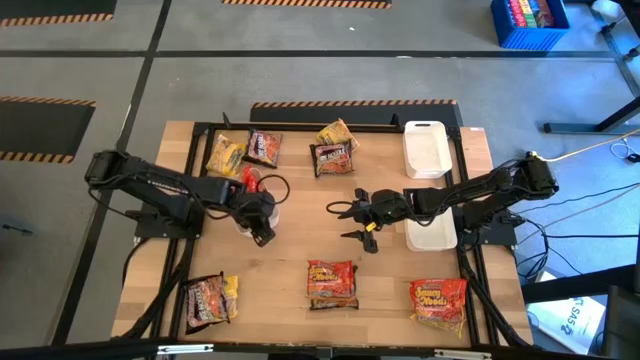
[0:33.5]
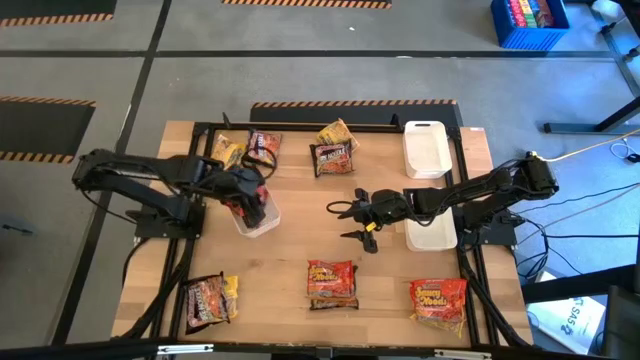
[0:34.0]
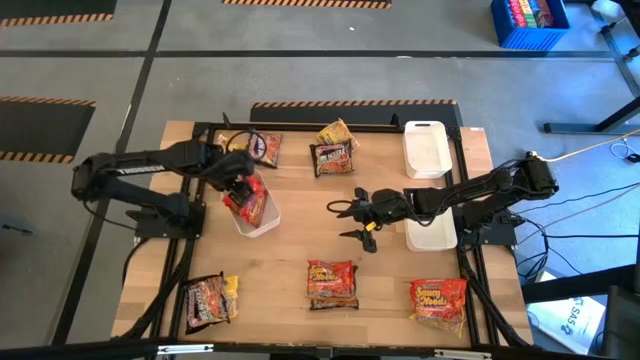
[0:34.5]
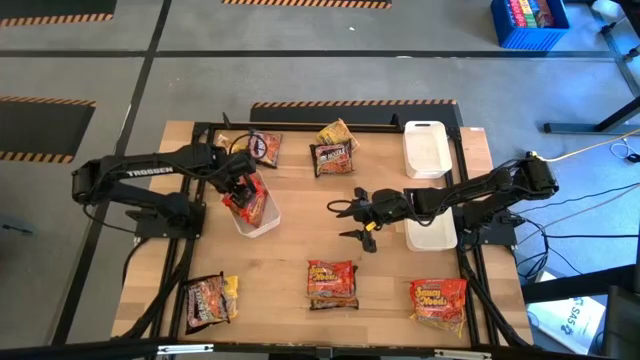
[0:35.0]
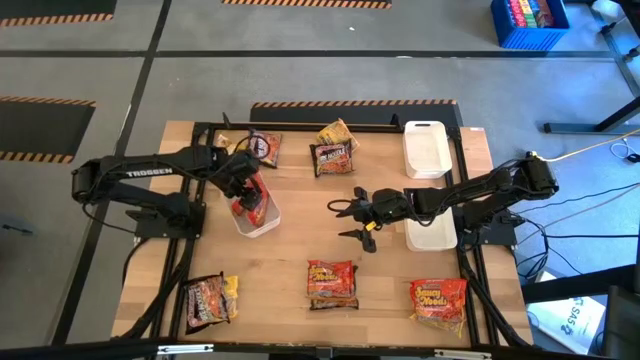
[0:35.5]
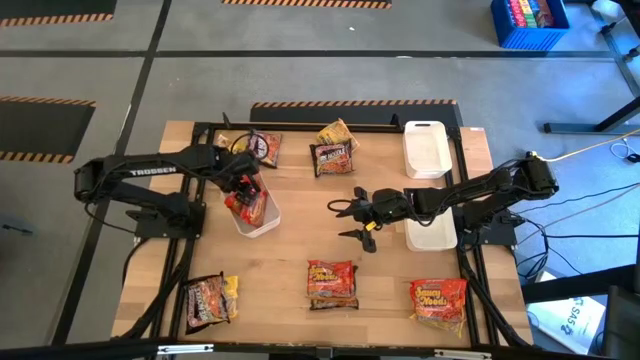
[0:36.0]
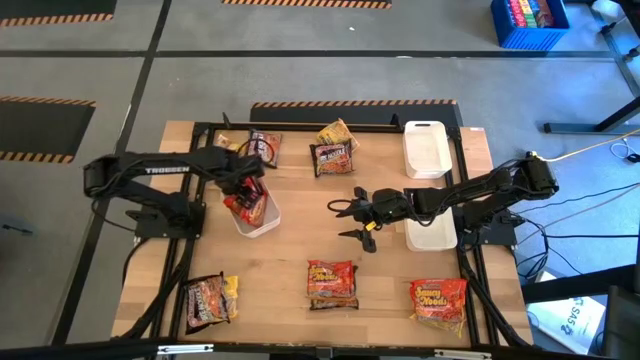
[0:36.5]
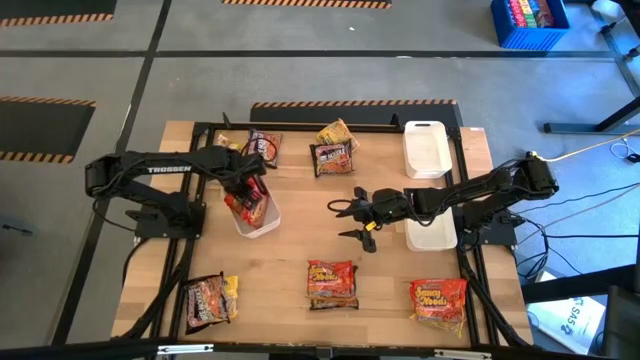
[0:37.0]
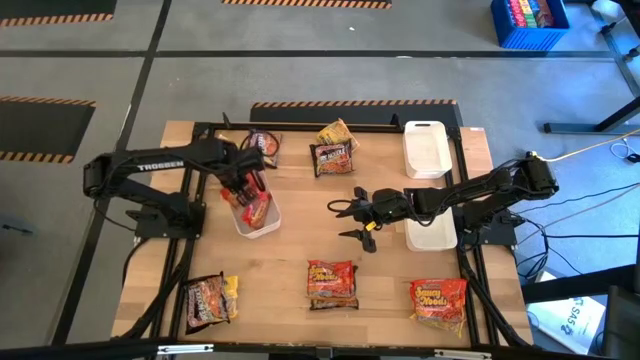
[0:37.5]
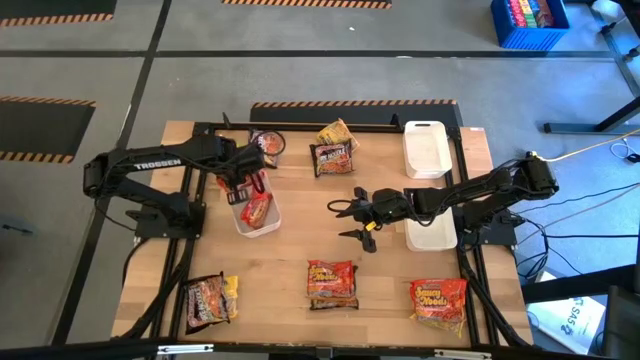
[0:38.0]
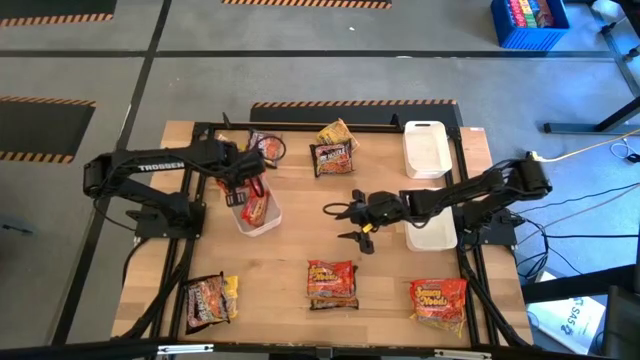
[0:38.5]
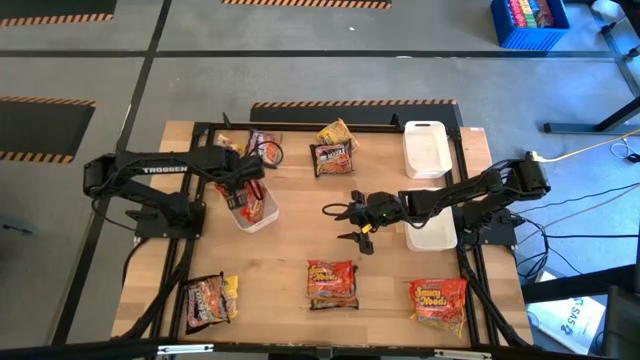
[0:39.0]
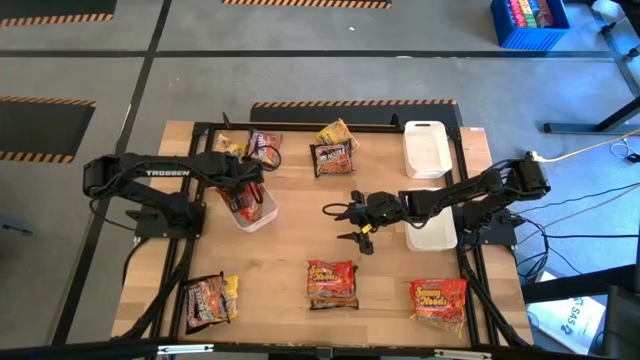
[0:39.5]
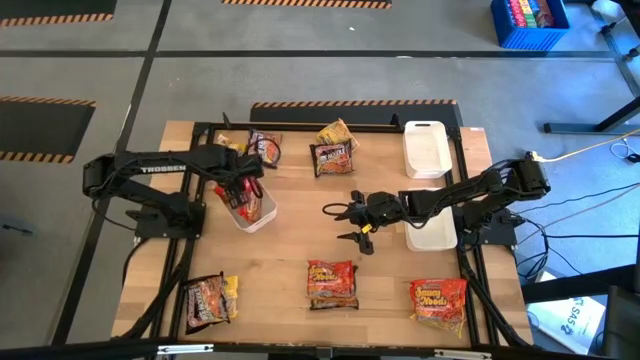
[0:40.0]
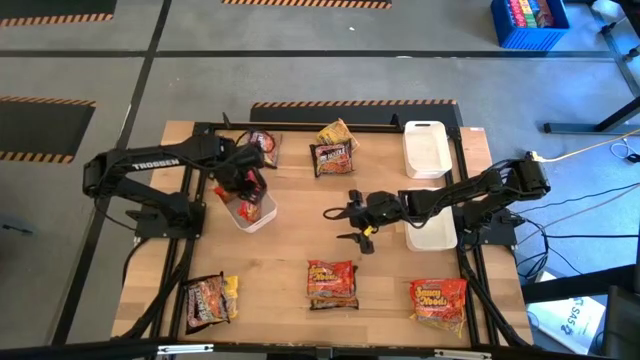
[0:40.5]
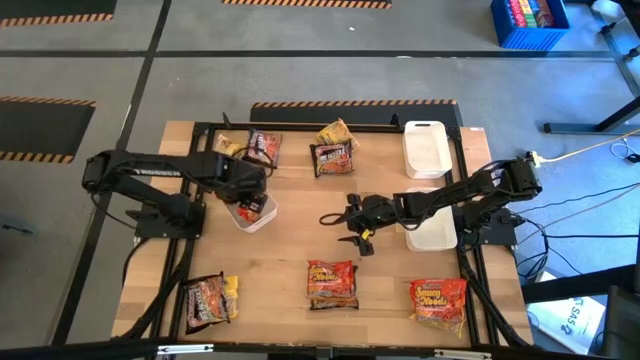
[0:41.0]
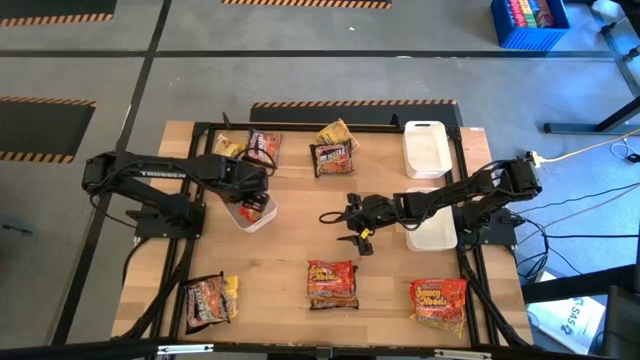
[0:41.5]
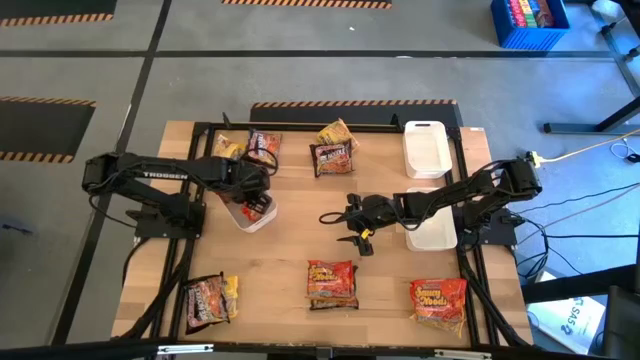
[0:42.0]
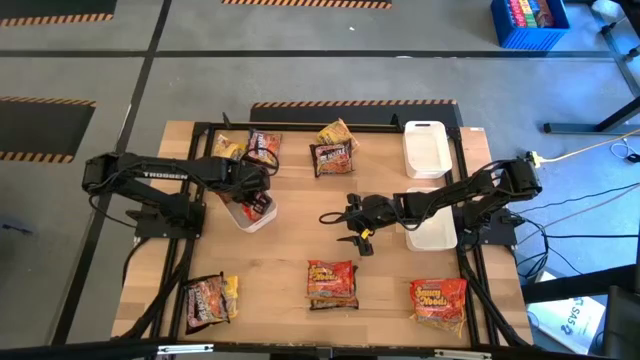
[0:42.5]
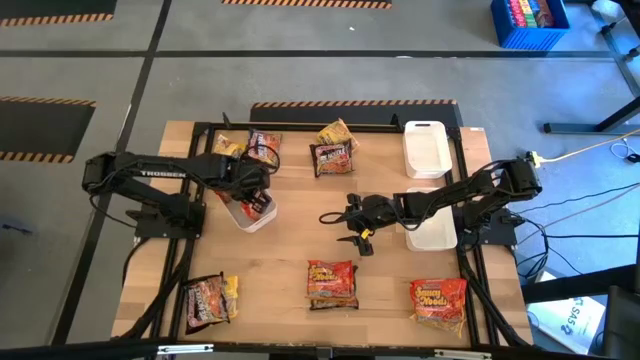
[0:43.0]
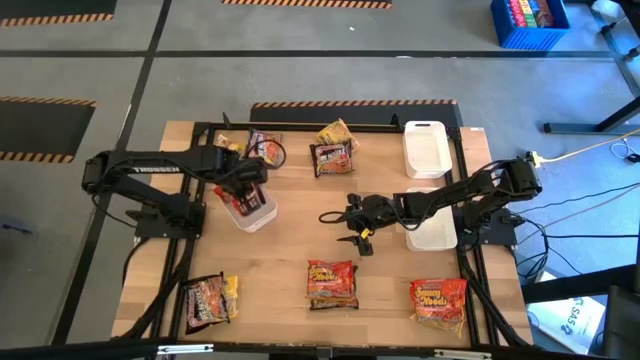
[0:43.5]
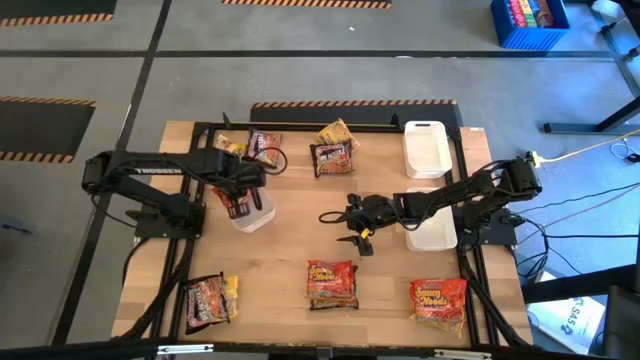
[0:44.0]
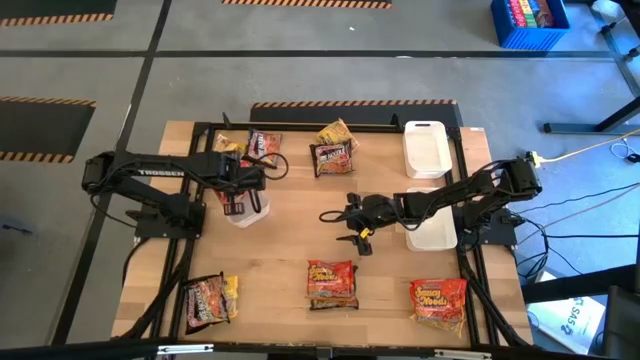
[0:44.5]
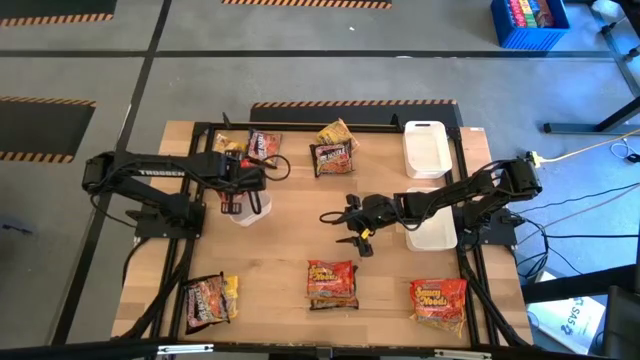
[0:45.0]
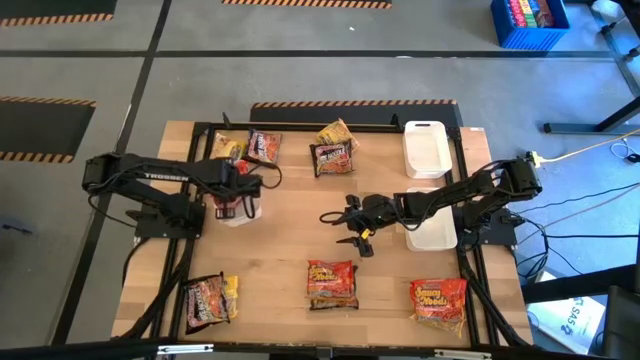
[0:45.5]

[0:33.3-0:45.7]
Task: Sort Maruchan noodles
Adjust the noodles

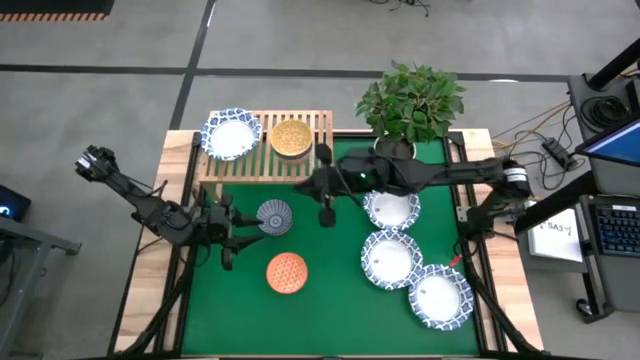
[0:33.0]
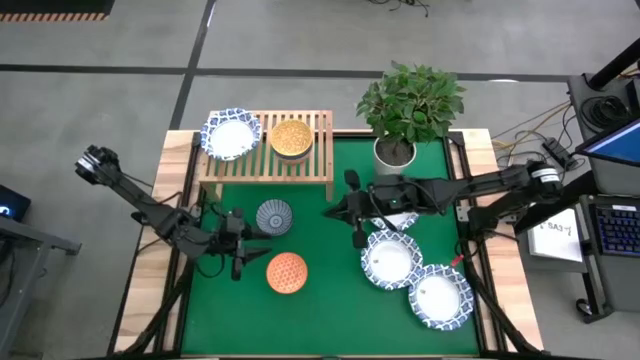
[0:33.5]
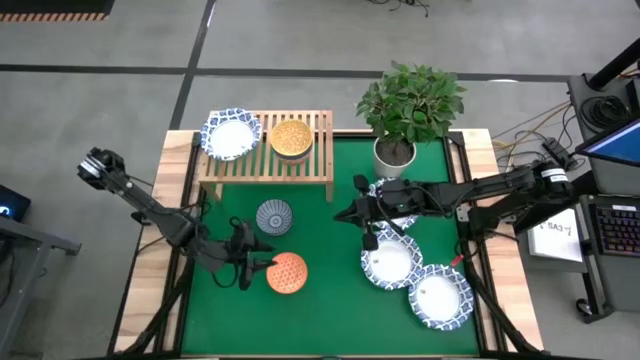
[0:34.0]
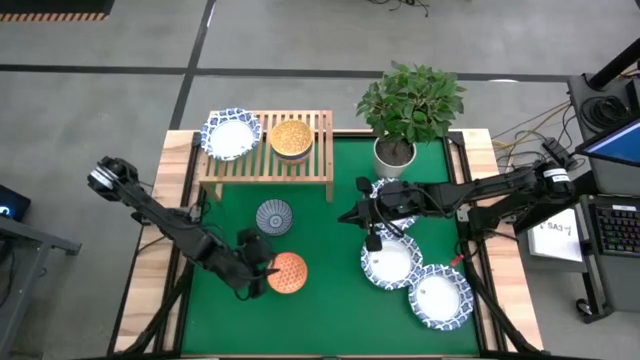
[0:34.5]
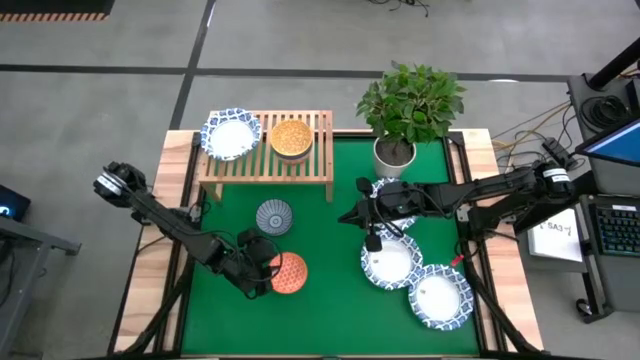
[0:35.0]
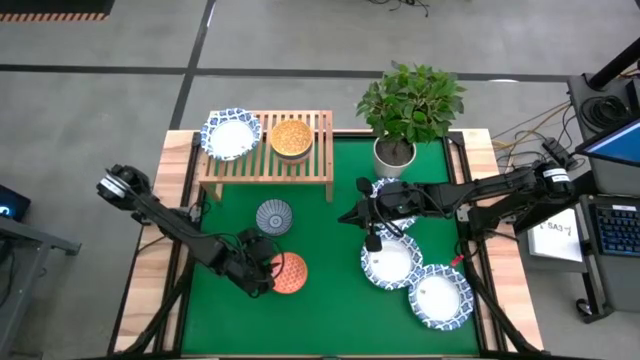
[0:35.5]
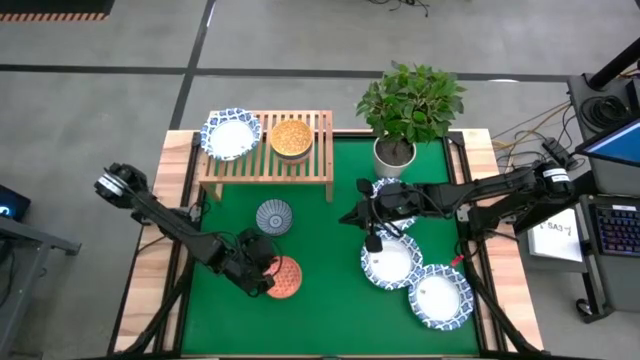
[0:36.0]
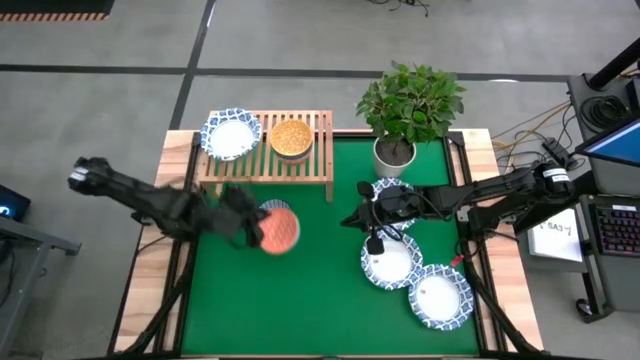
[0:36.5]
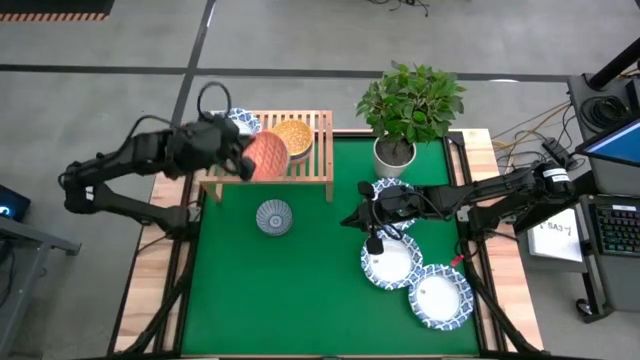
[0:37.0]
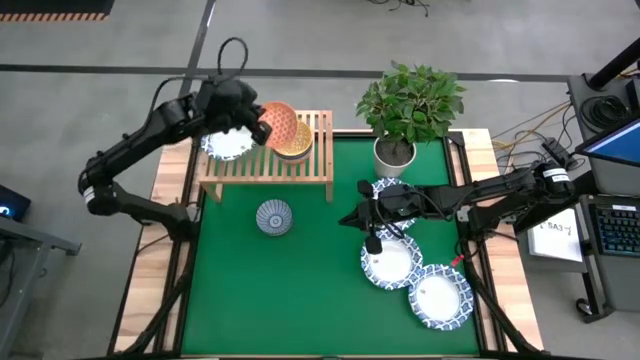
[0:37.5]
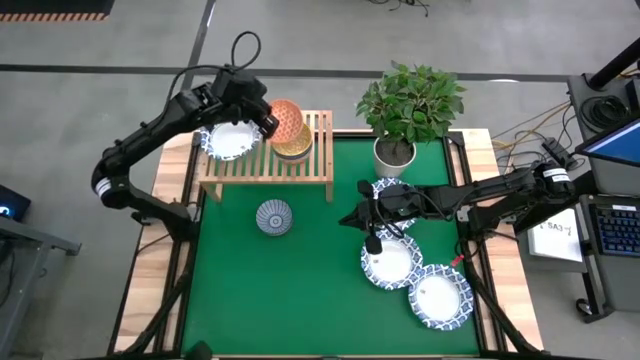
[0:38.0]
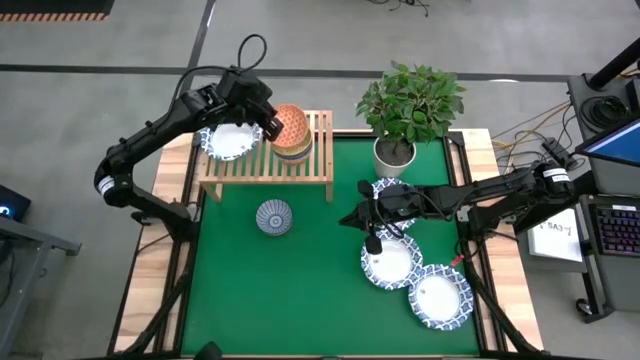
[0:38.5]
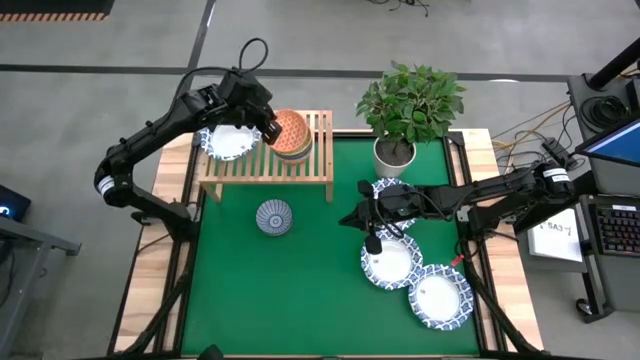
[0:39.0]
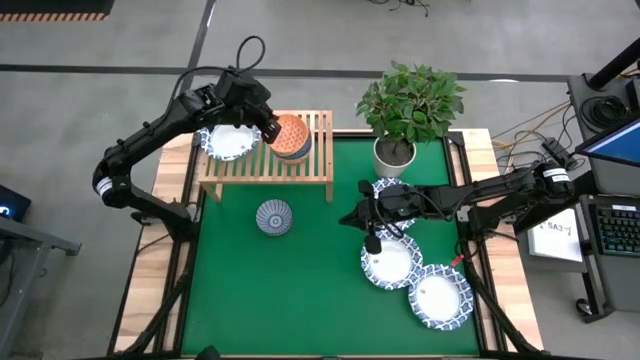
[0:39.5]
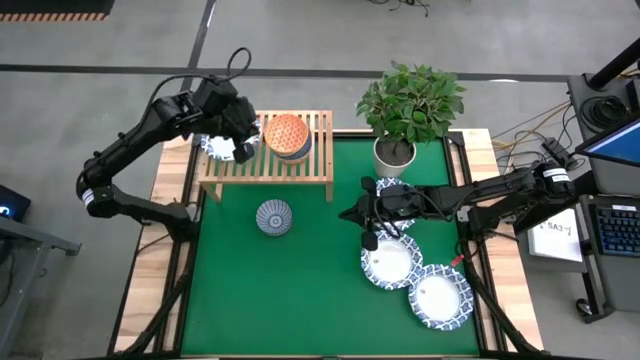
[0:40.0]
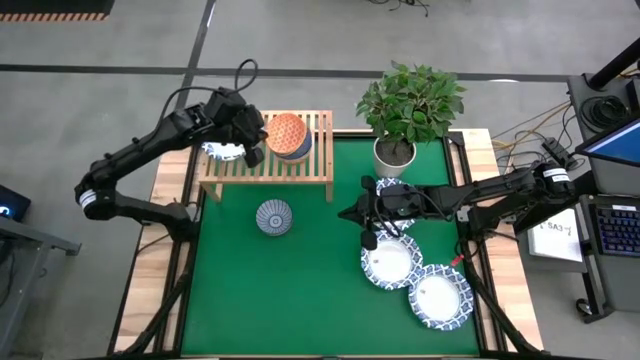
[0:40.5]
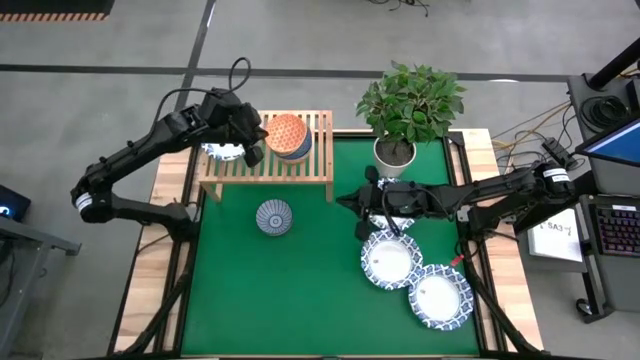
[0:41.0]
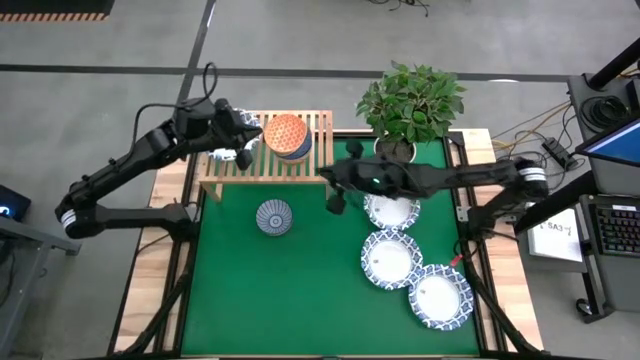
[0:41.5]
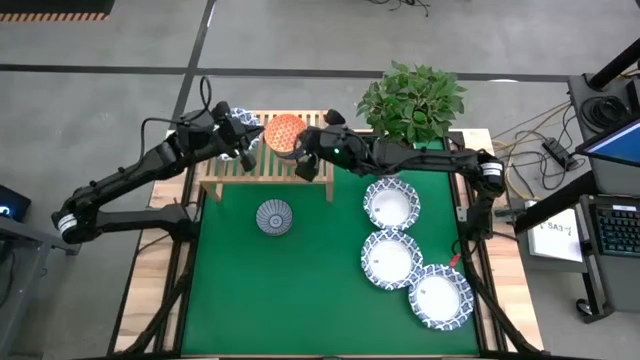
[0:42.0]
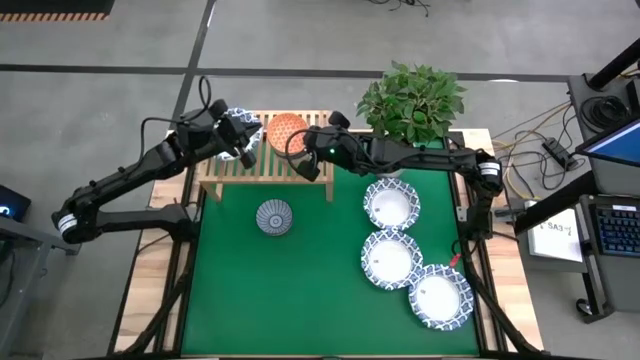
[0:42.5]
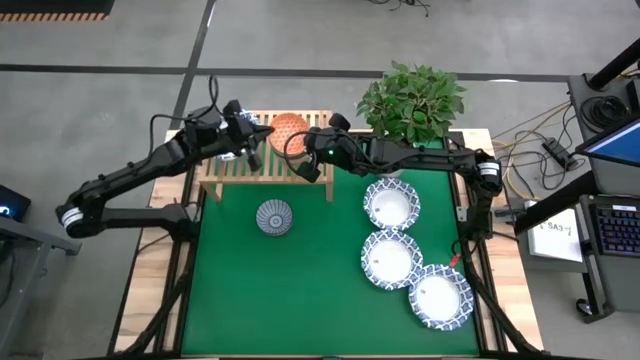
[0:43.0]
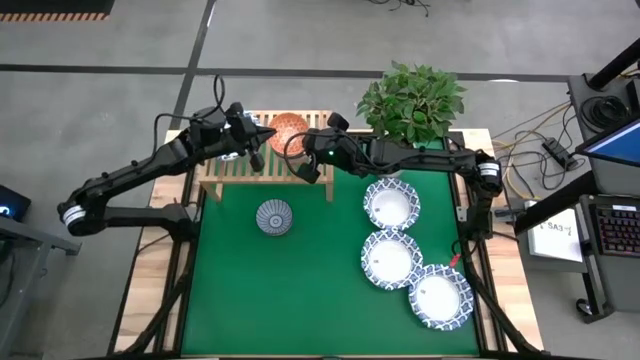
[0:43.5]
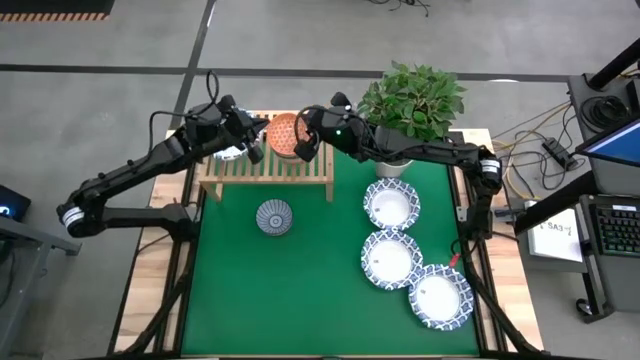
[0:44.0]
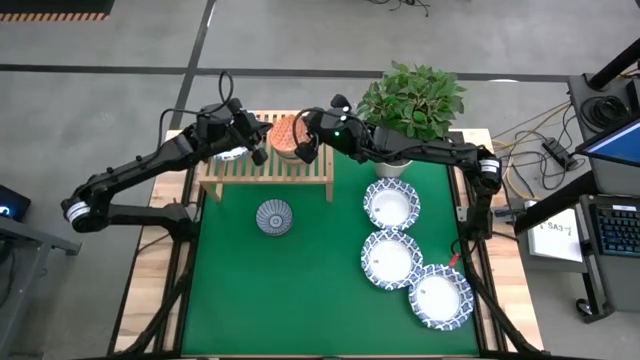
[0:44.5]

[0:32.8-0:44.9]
Task: Place and stack bowls onto a shelf
Stack the orange bowl on top of the yellow bowl on the shelf
